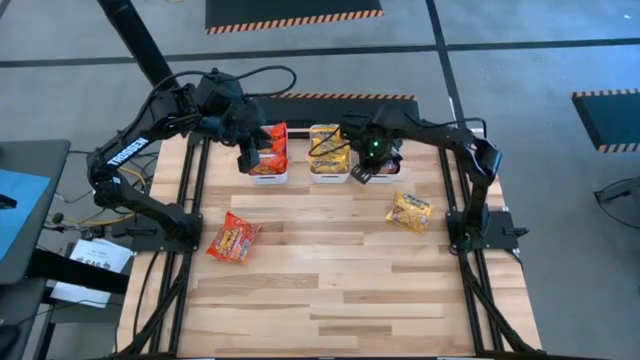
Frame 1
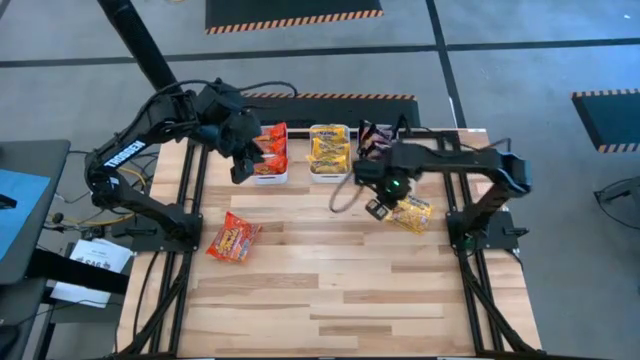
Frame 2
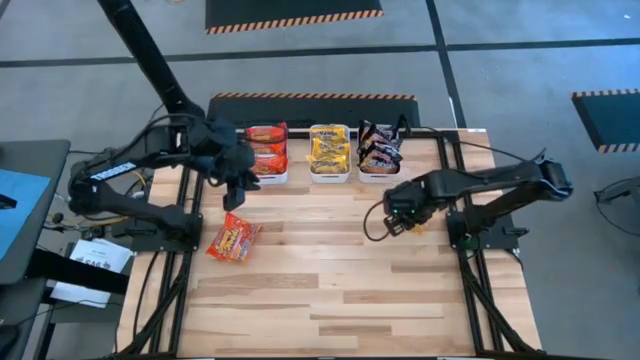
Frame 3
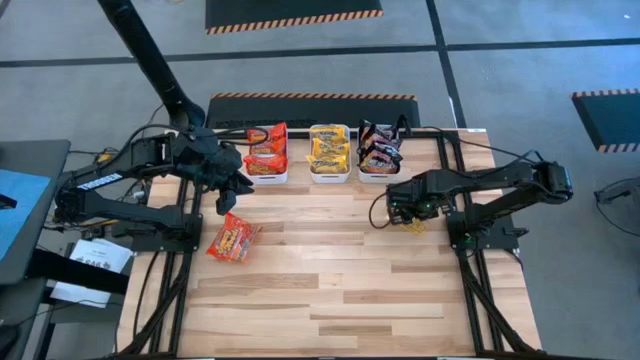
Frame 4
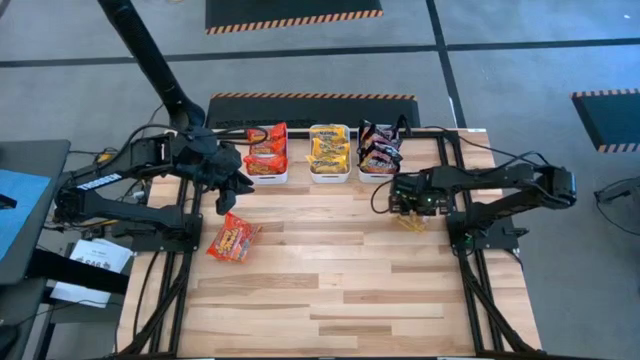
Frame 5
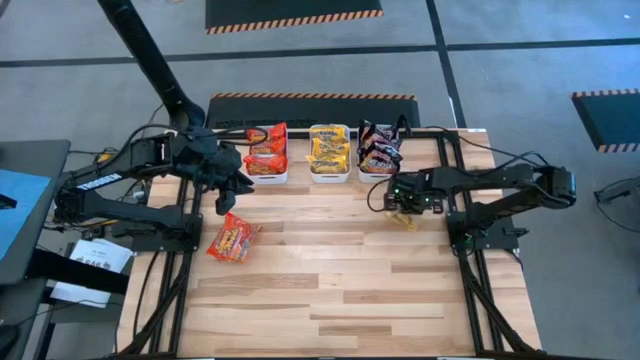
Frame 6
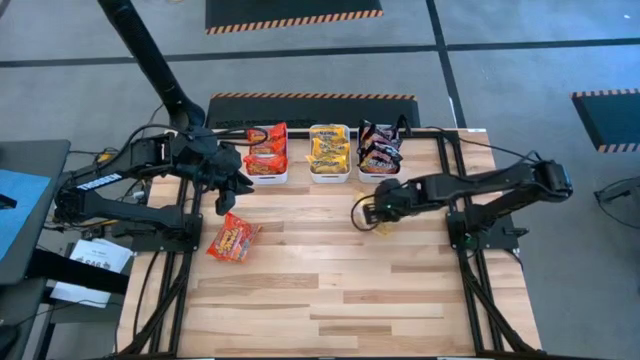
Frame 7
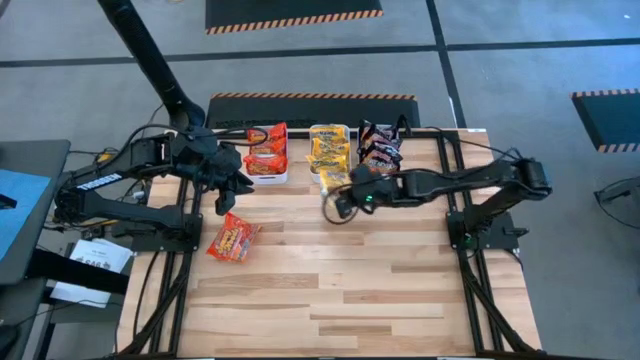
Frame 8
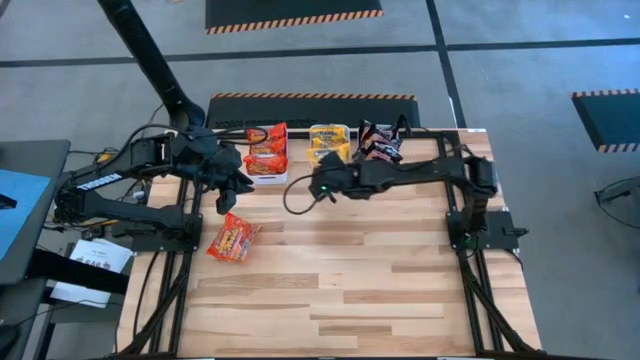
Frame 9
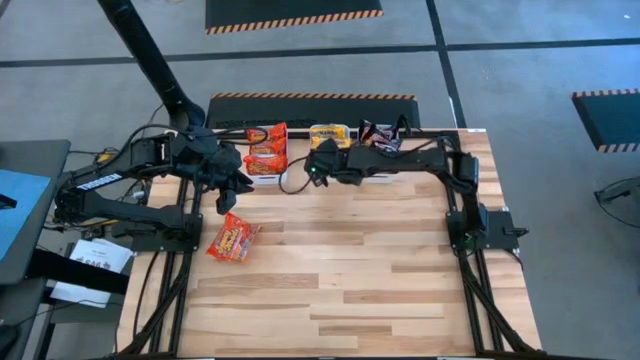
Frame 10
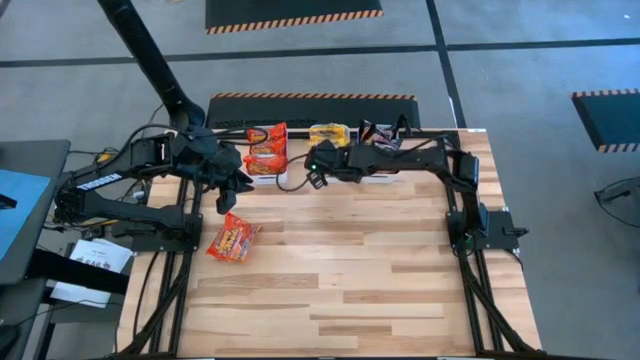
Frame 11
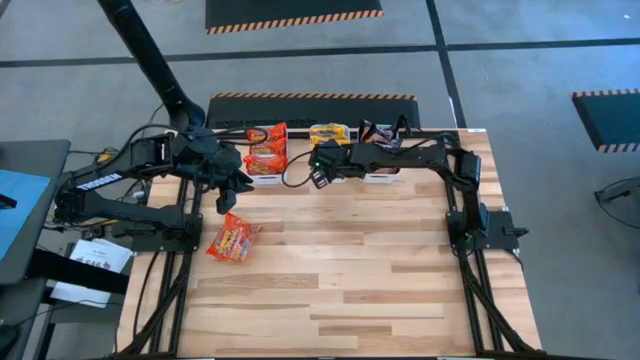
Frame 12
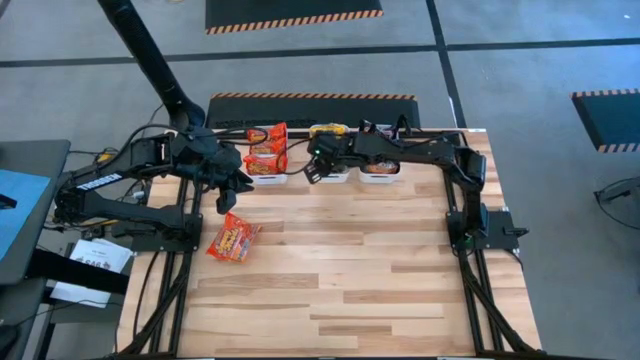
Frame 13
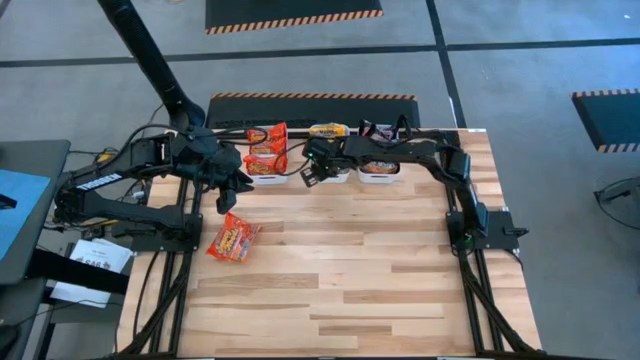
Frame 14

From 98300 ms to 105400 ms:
Task: Sort Maruchan noodles
Put the yellow noodle pack into the middle white bin

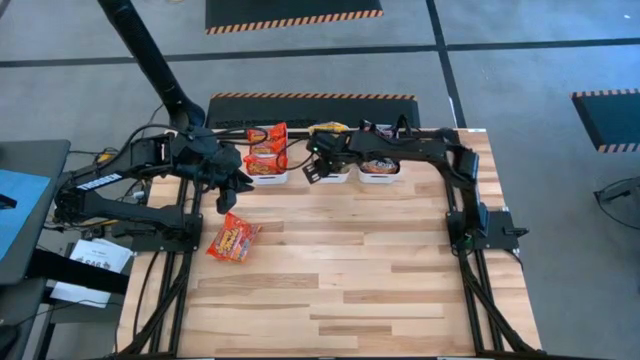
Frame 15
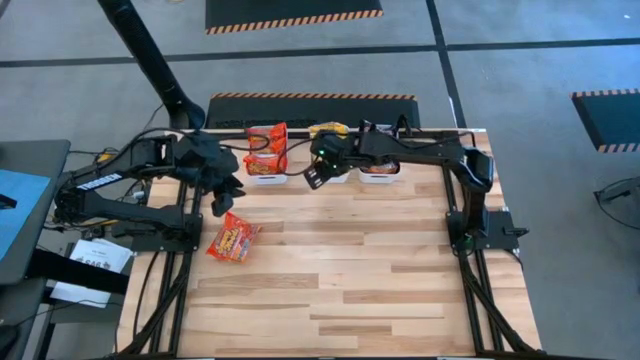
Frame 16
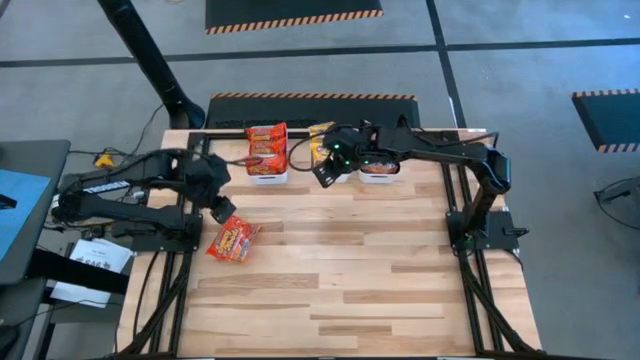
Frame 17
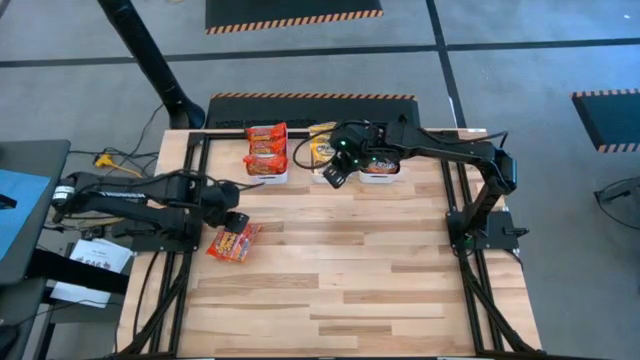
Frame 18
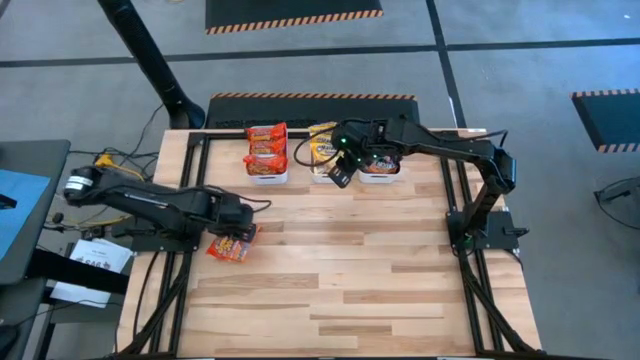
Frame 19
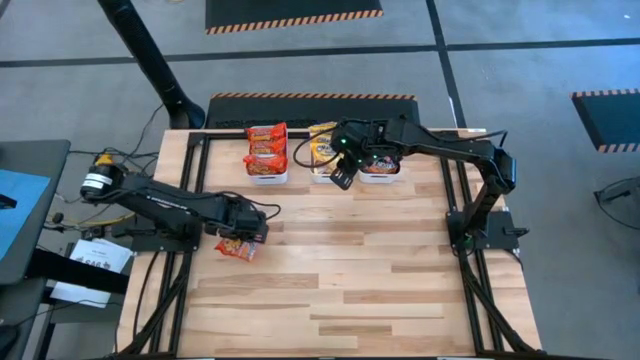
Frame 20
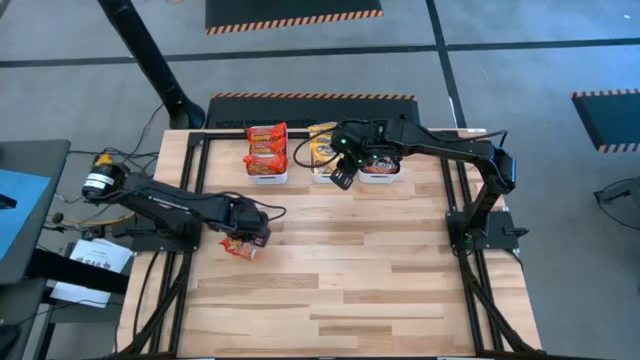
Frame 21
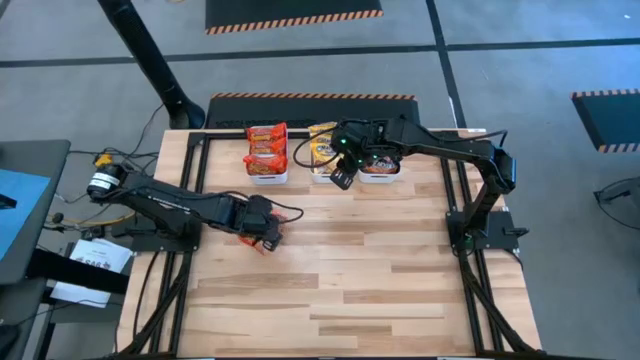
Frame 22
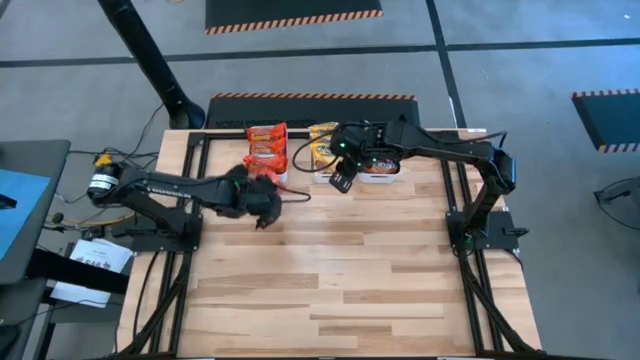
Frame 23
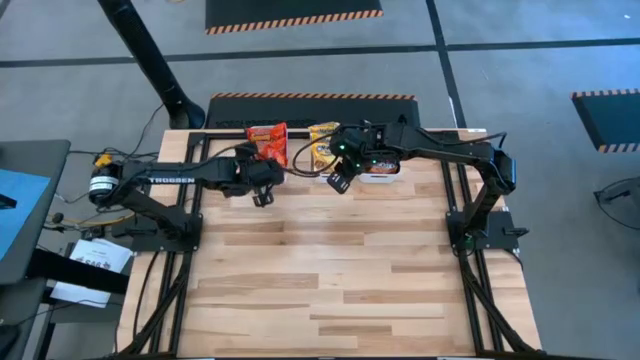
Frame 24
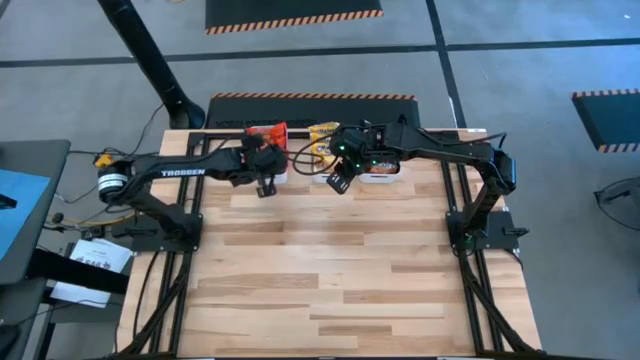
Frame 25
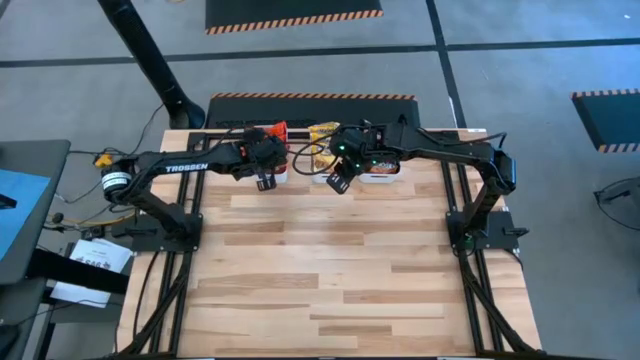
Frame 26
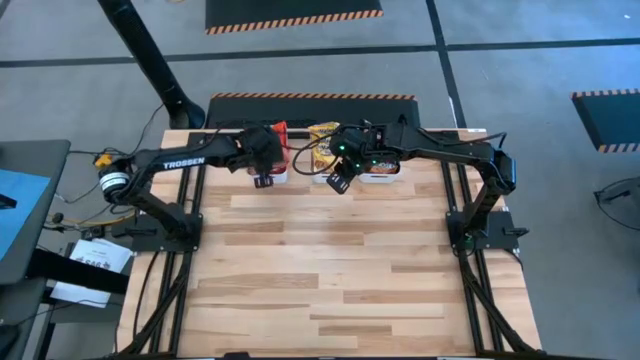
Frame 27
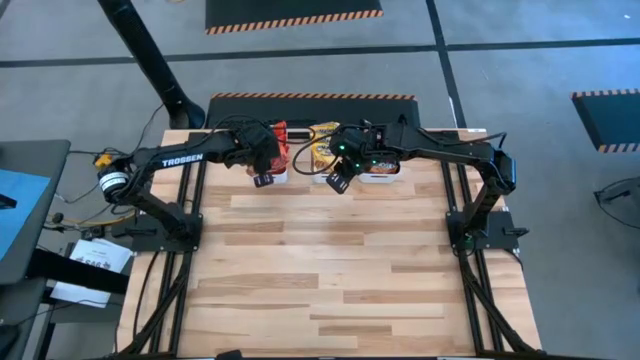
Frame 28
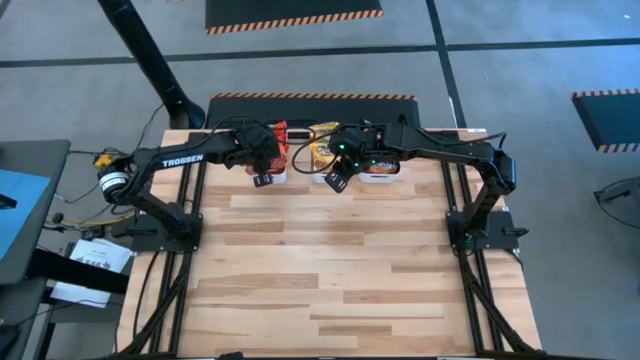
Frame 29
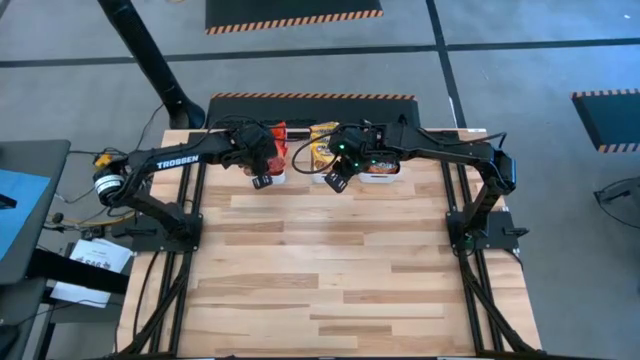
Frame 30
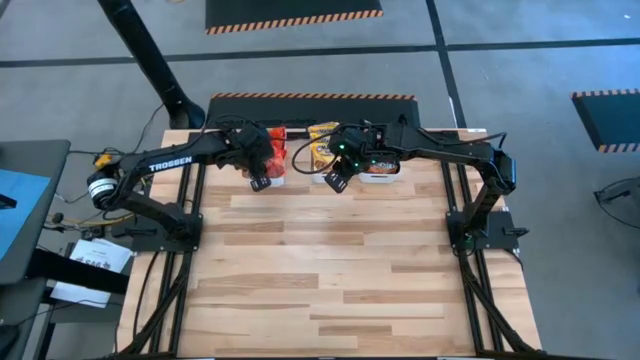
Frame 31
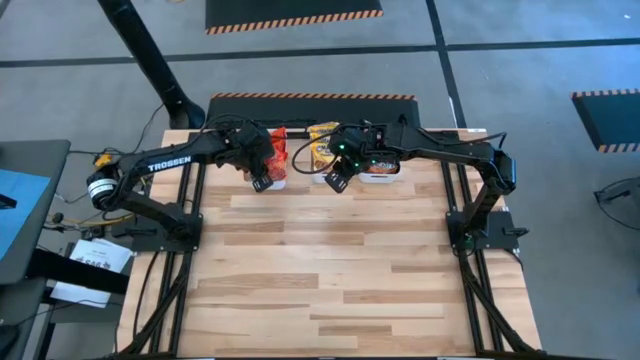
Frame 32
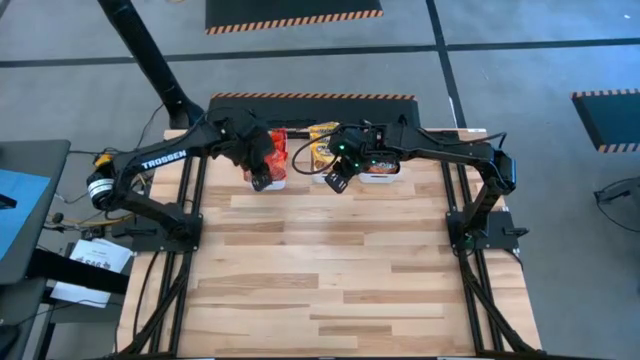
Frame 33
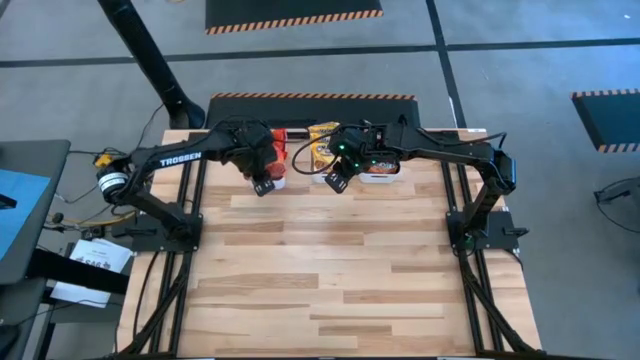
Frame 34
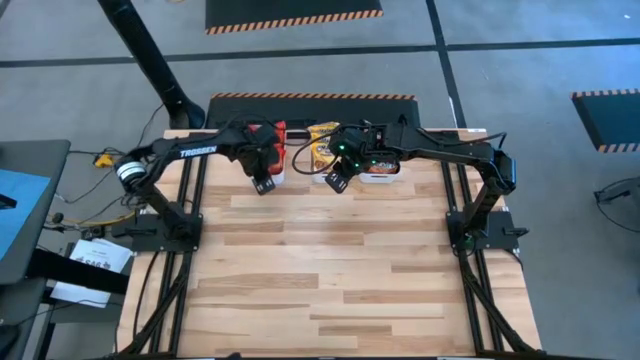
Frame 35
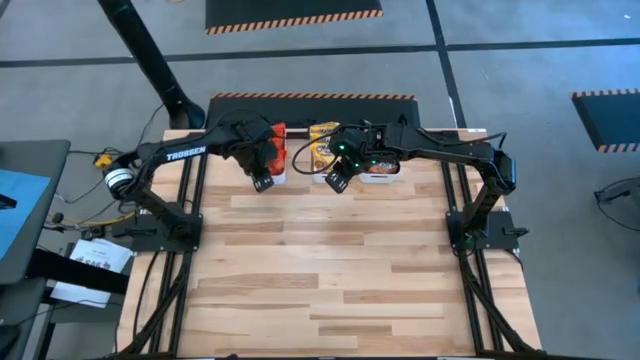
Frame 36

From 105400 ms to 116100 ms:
Put the orange noodle pack into the left white bin

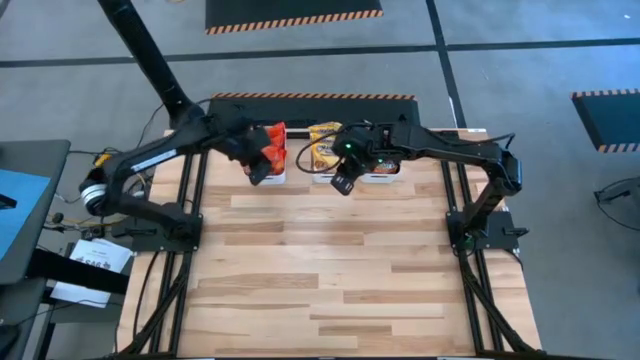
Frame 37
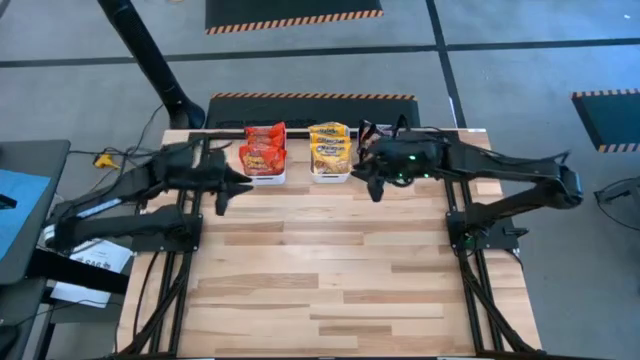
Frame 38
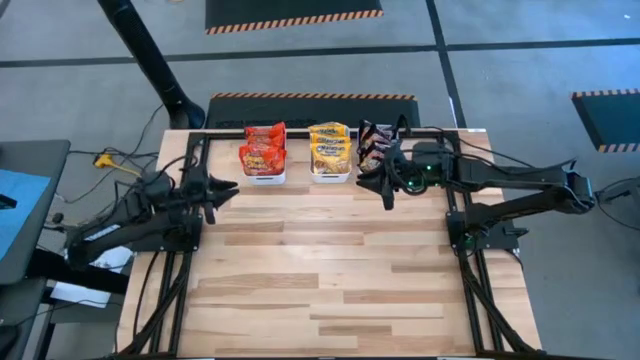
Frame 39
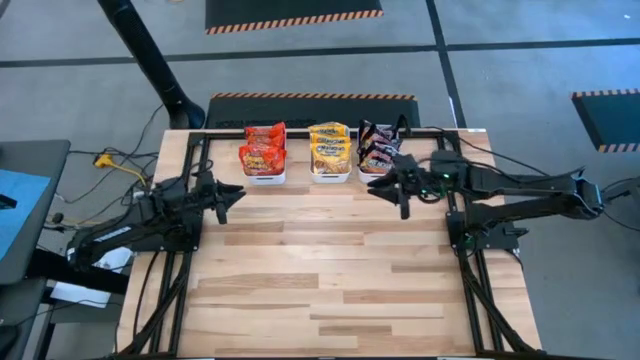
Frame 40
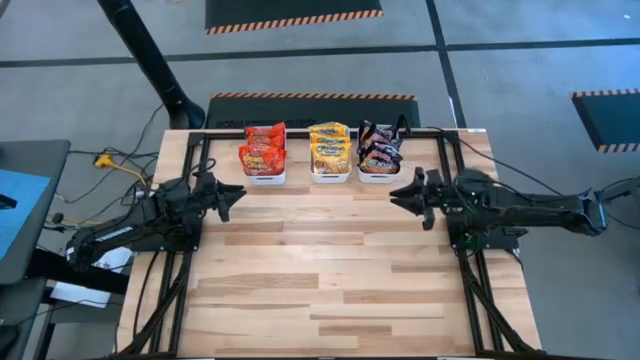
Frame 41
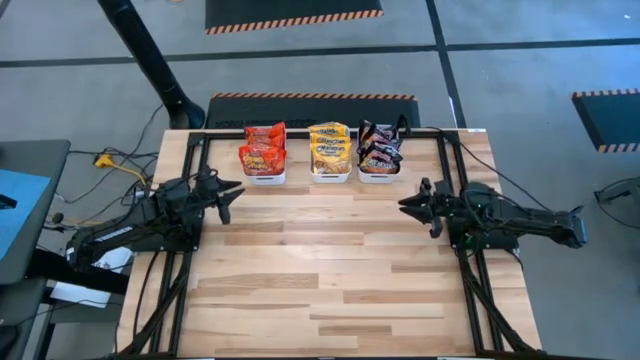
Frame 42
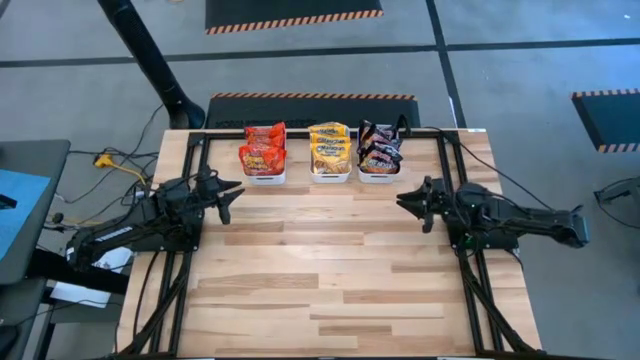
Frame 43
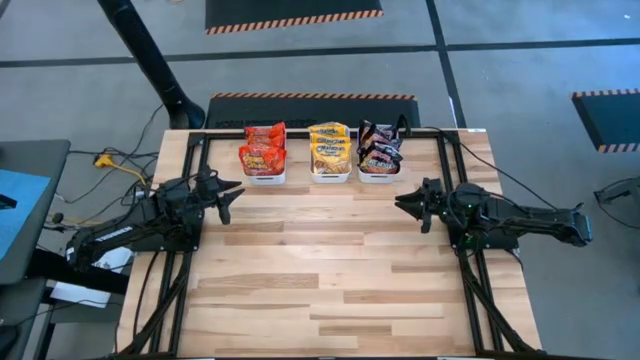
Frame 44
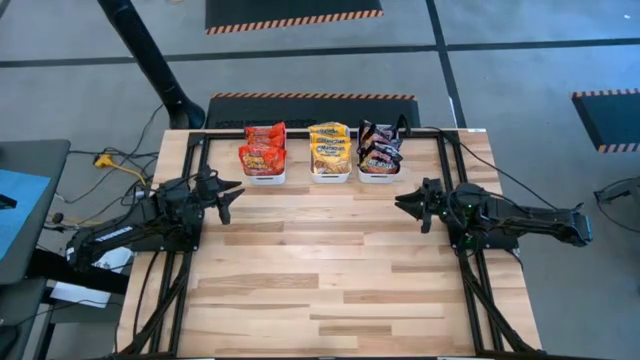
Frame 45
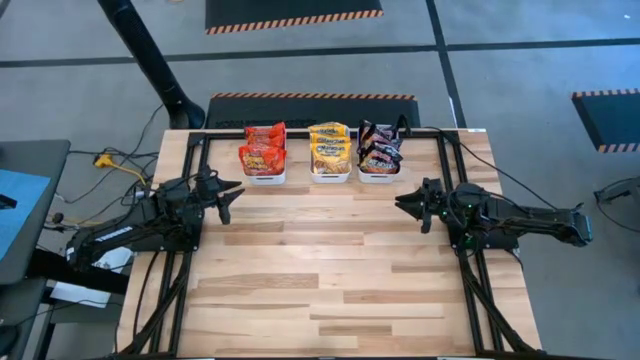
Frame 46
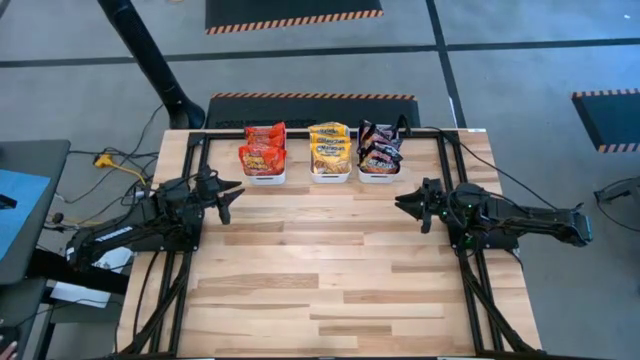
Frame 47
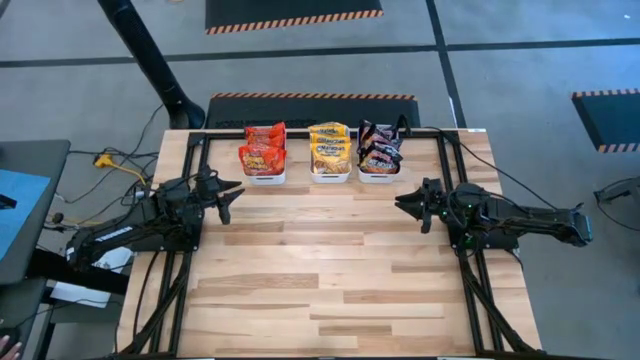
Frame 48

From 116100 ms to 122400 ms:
Return to Home Position
